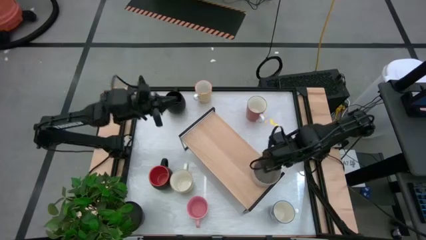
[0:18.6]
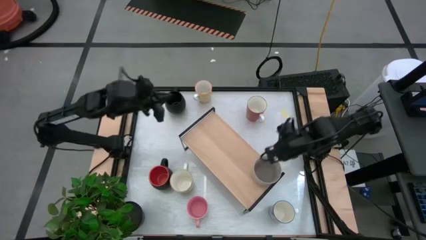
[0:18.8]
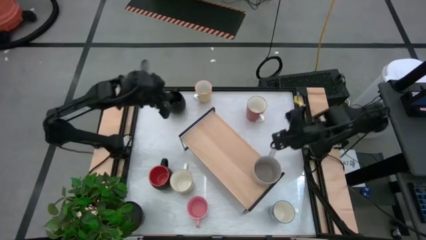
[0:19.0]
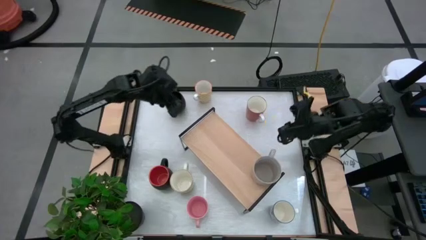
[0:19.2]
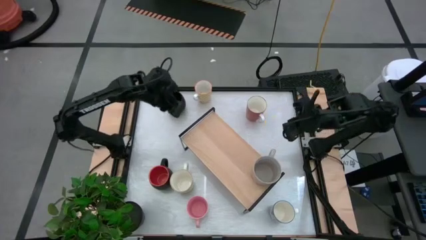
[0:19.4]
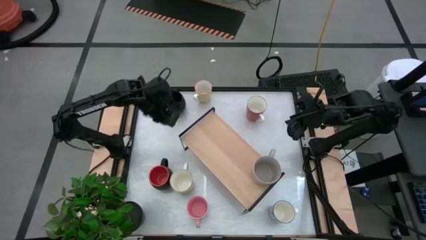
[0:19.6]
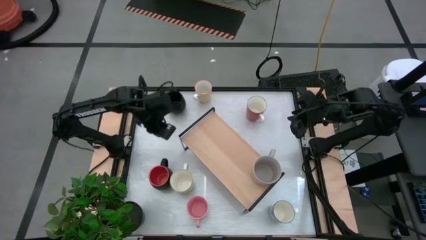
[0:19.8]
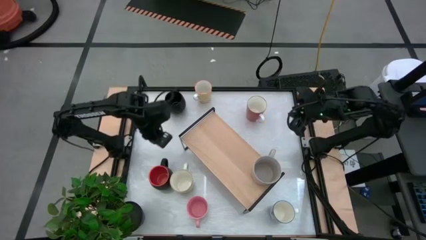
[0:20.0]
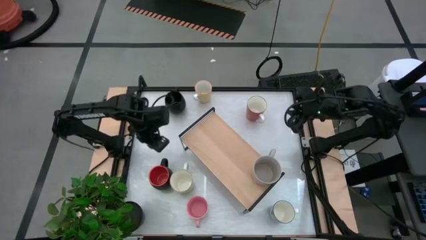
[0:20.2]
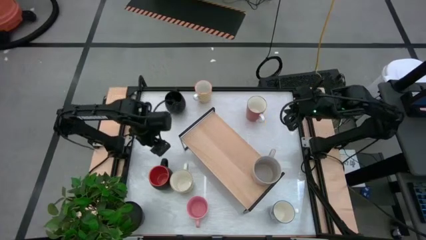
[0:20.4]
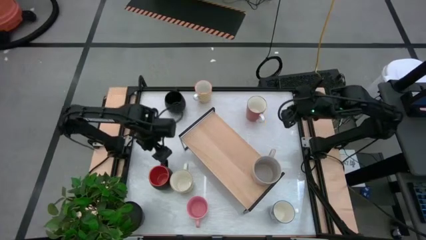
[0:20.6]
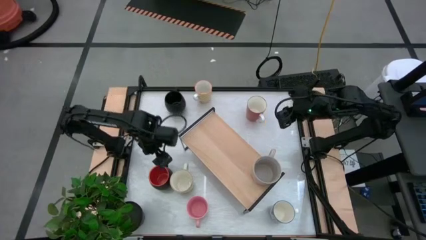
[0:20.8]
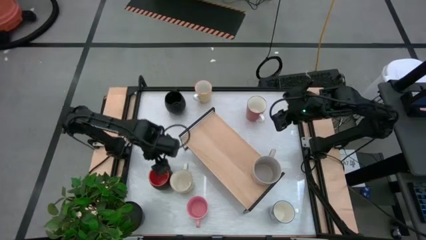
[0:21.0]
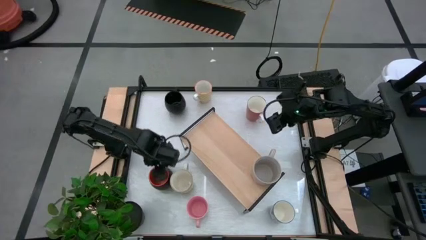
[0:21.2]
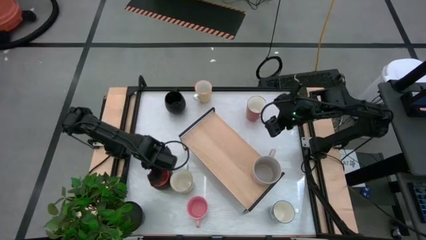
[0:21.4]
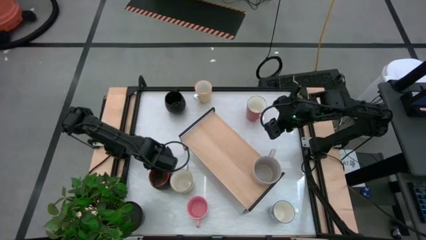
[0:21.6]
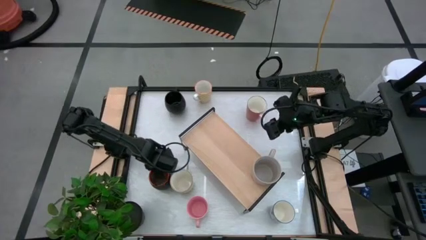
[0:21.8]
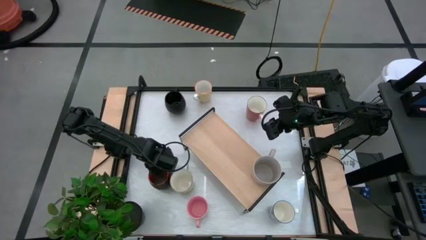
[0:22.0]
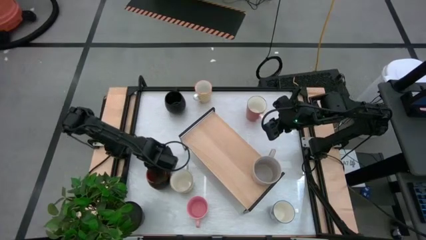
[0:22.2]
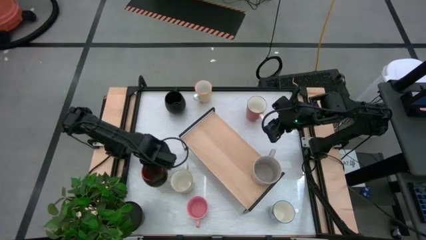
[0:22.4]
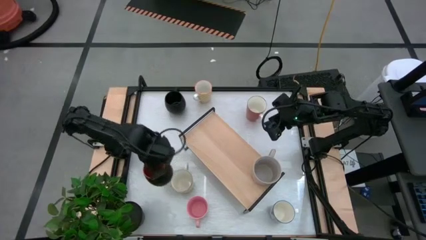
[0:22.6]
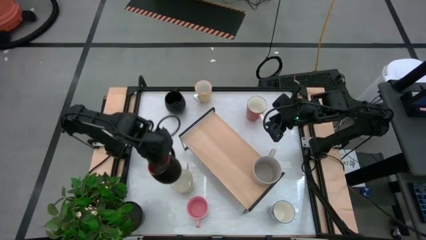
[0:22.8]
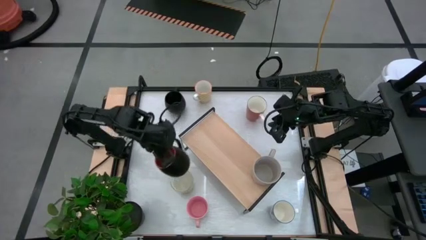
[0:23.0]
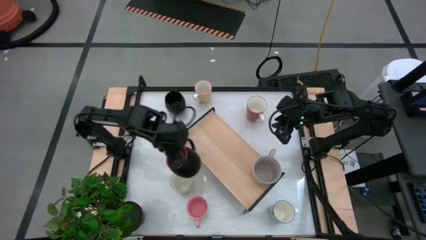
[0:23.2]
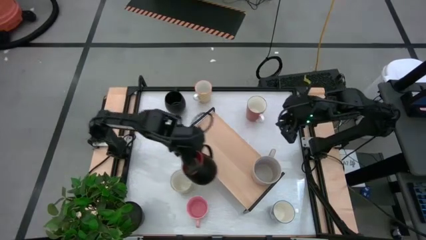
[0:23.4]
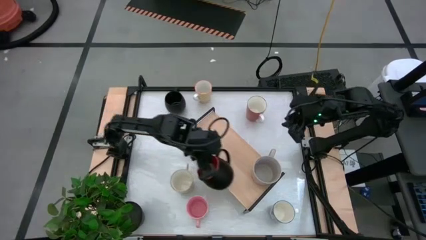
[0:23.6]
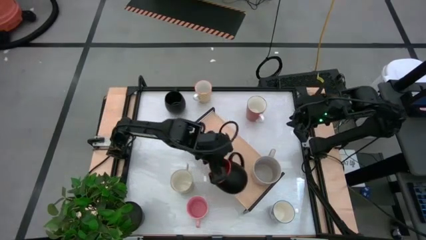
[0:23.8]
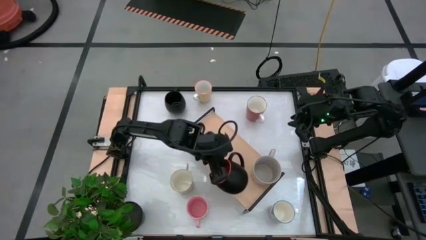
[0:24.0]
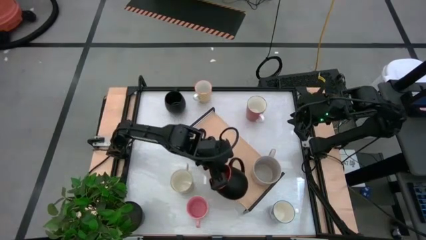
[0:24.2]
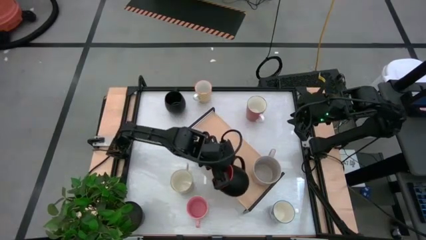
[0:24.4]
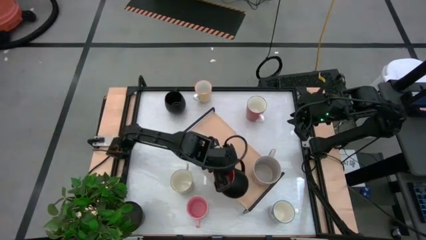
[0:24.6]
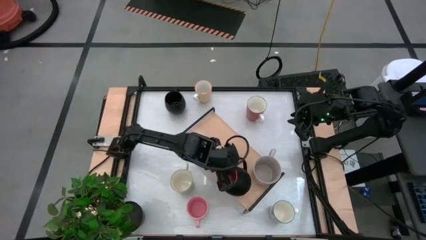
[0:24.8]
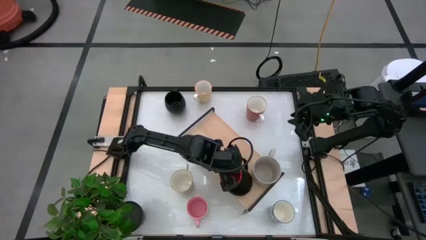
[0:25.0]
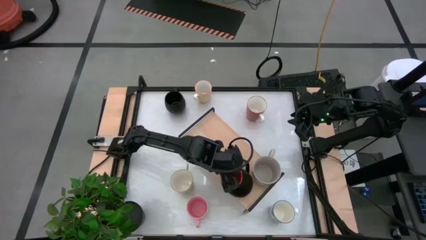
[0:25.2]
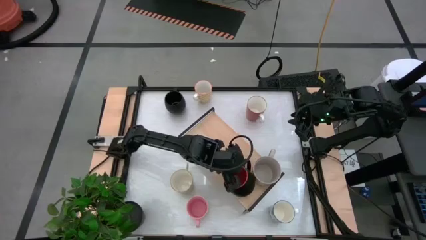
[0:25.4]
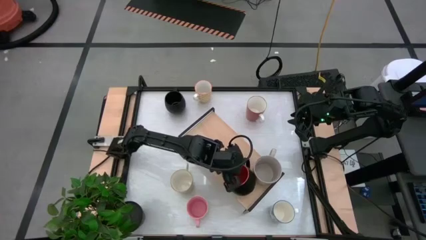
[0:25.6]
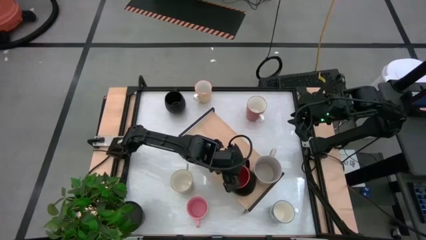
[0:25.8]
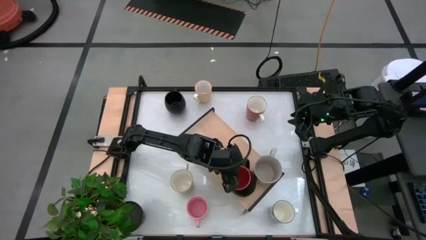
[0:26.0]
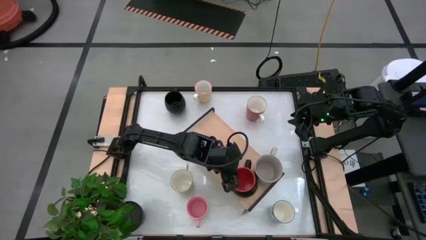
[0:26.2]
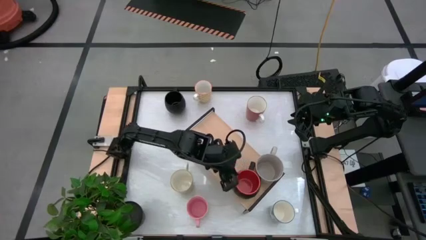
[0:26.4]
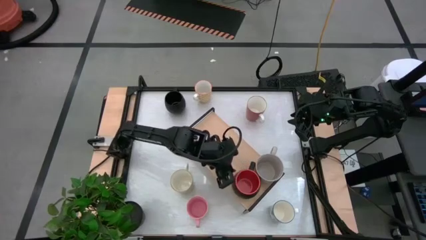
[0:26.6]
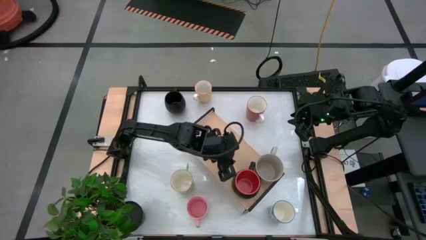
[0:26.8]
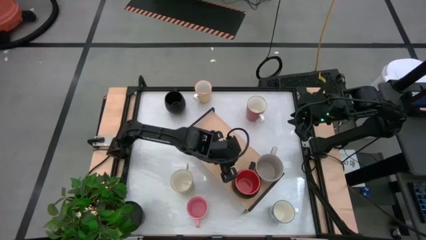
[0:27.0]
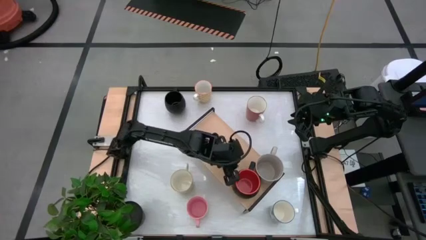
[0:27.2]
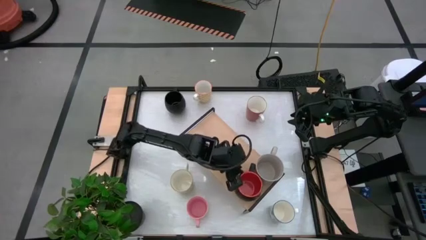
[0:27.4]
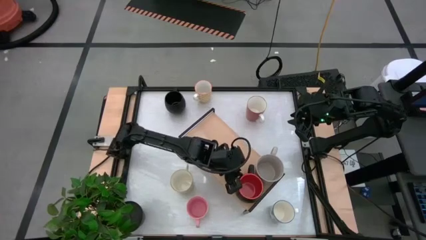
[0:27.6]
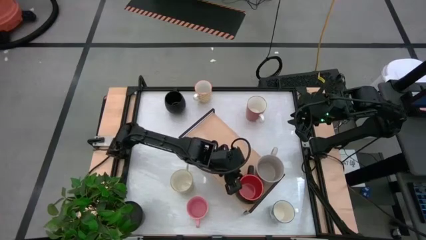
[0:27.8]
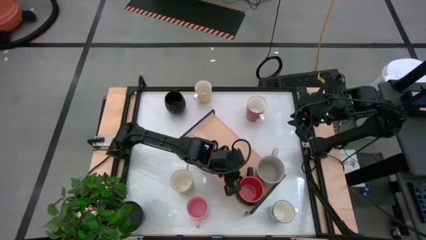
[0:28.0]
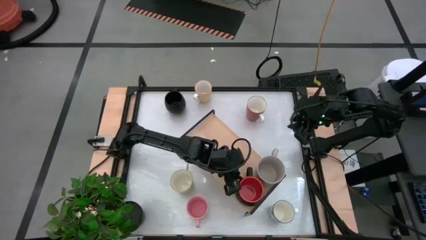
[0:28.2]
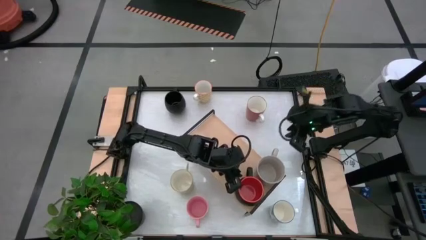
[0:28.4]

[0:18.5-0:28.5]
Task: Place coffee mugs
Put the orange-black mug on the shelf

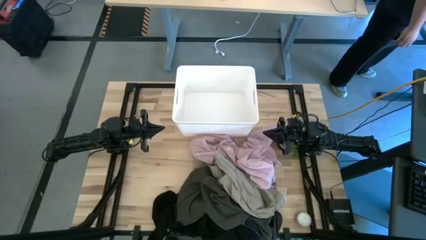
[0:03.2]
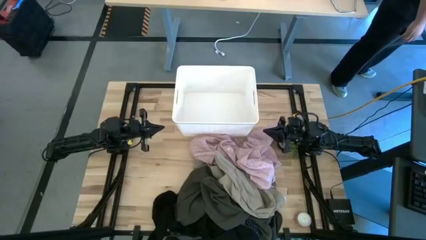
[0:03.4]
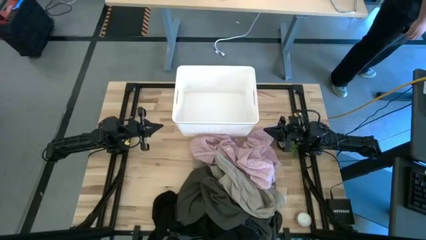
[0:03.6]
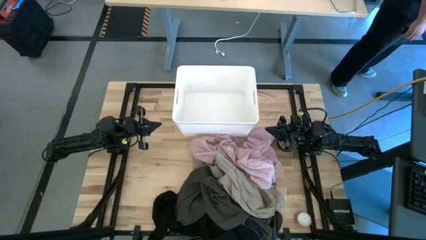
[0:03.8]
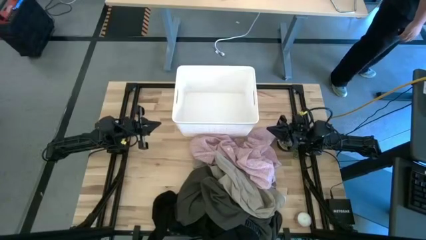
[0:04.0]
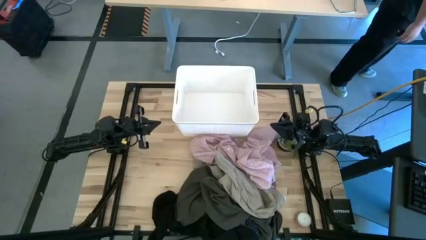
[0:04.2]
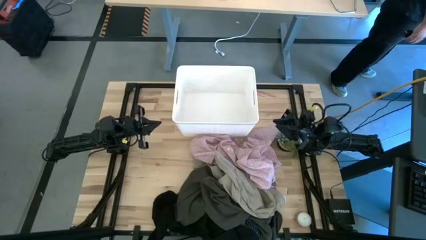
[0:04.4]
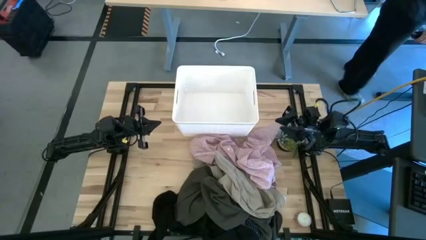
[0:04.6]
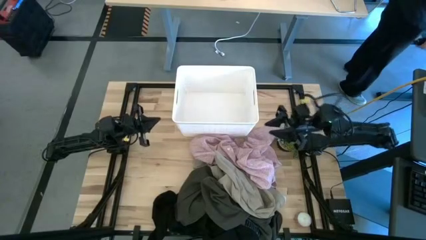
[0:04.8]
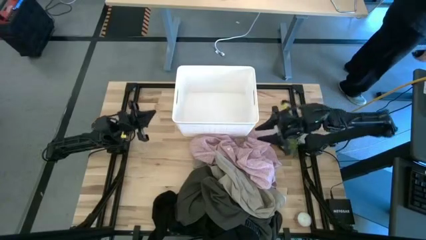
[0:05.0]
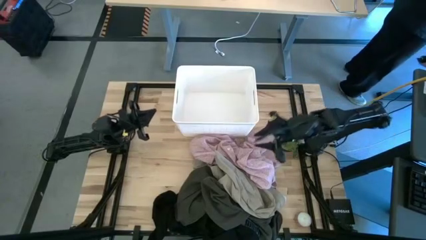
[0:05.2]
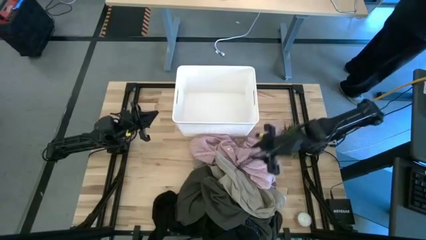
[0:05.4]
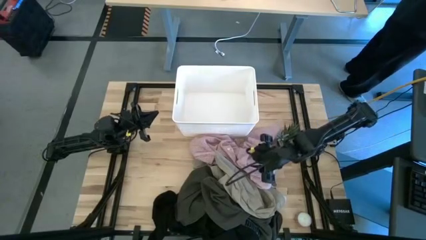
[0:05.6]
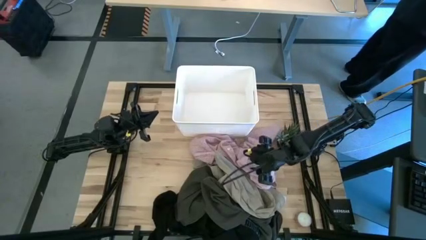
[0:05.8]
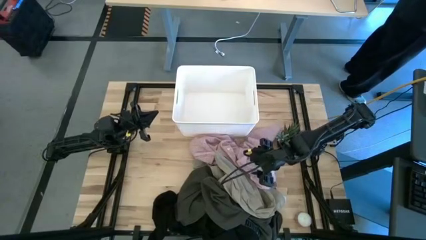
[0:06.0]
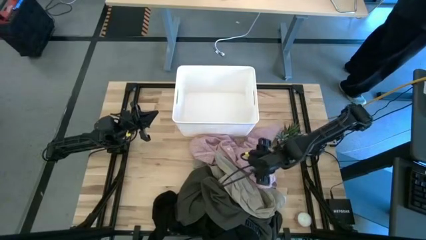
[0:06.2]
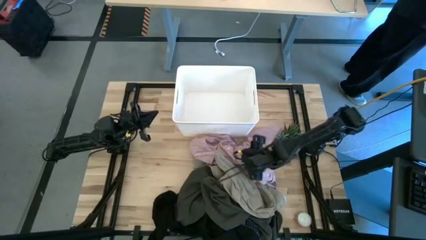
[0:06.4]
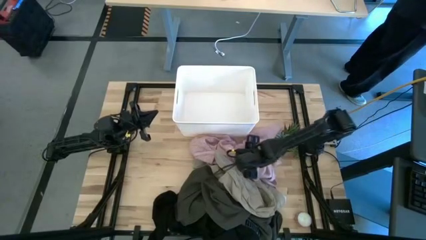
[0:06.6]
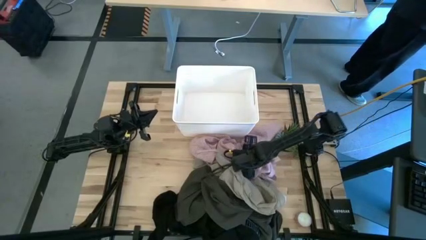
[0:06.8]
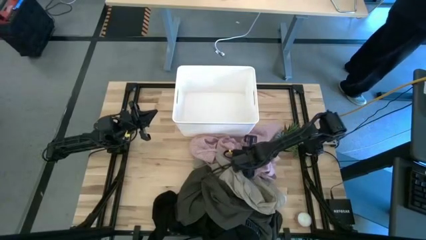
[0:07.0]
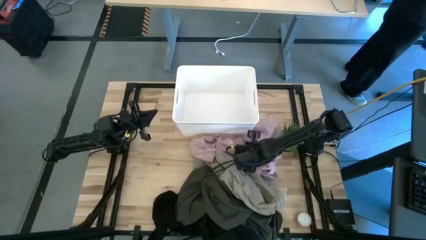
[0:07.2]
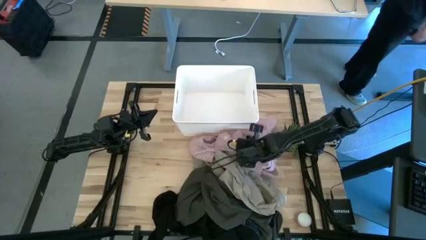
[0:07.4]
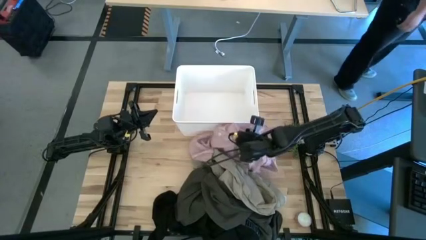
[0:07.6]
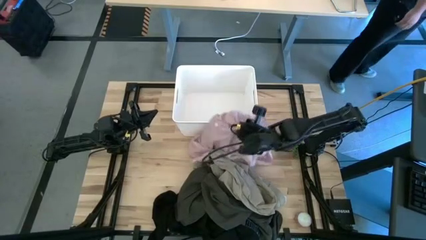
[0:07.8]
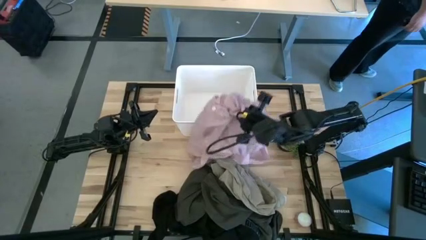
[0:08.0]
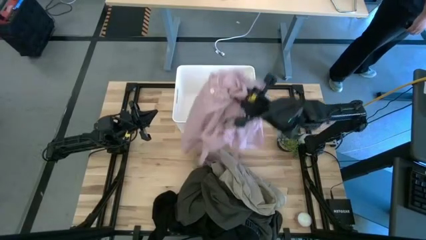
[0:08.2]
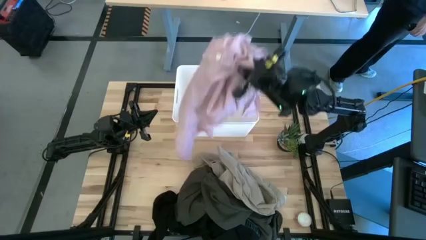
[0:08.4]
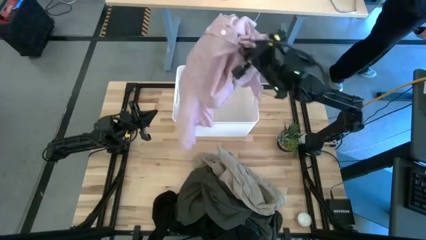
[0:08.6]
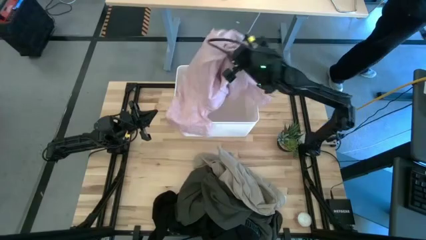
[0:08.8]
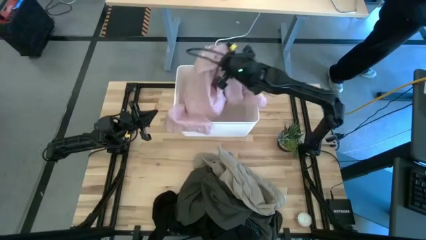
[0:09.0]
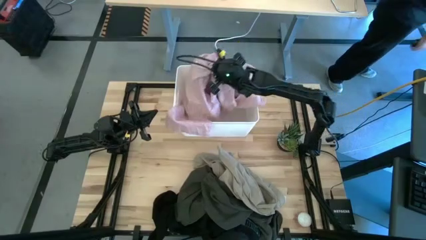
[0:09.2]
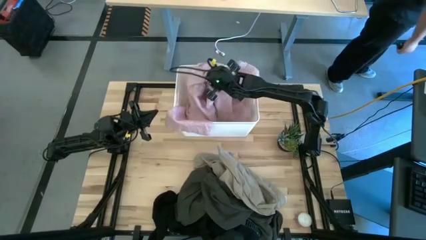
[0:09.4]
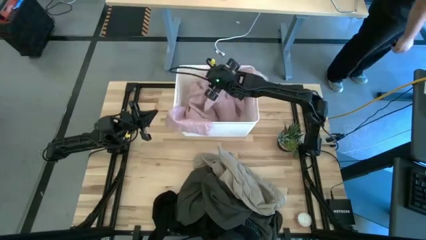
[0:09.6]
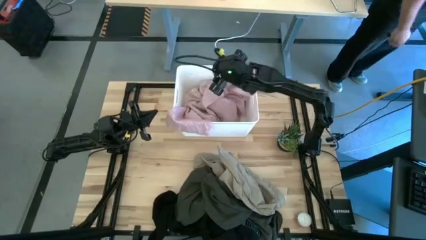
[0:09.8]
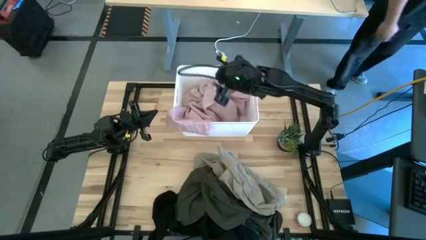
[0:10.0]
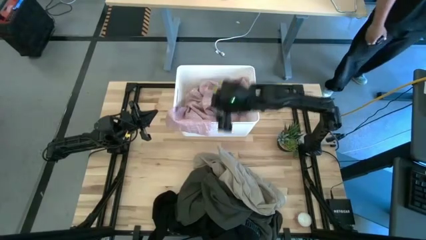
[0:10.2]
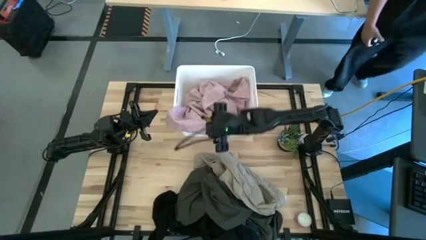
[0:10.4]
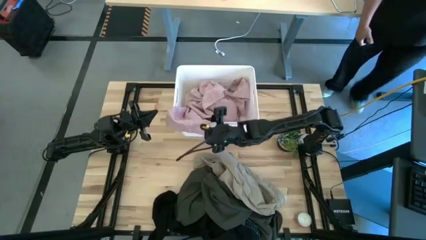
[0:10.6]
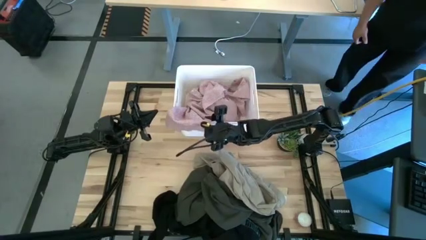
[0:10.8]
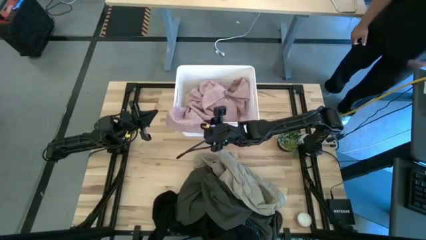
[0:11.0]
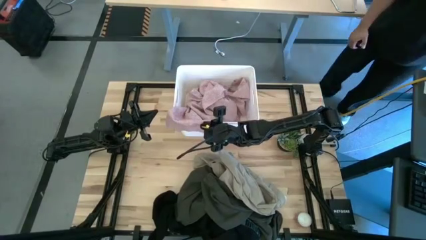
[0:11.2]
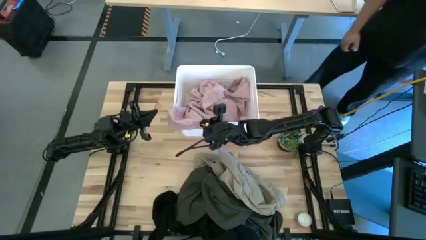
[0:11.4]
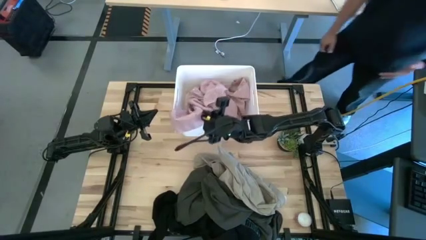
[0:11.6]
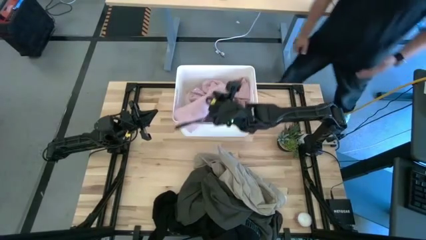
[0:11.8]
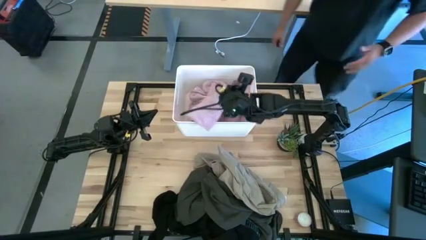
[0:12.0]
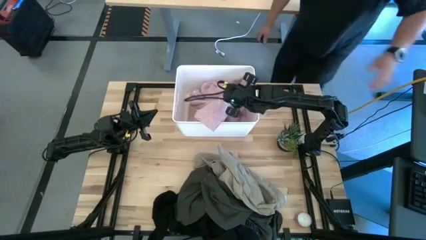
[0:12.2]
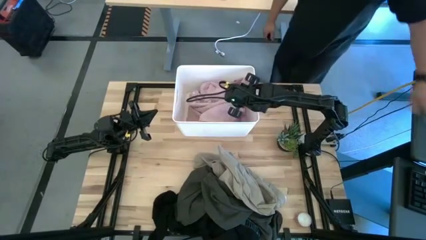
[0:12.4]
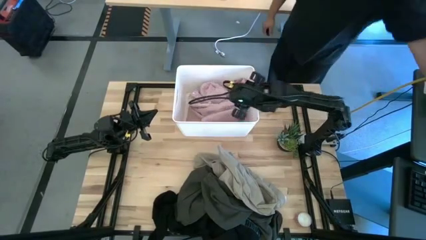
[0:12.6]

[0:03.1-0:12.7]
Task: Sort clothes
Put the pink shirt in the white container
